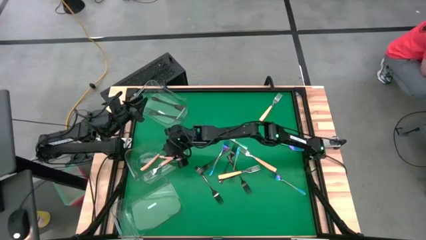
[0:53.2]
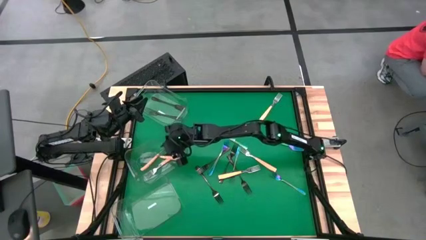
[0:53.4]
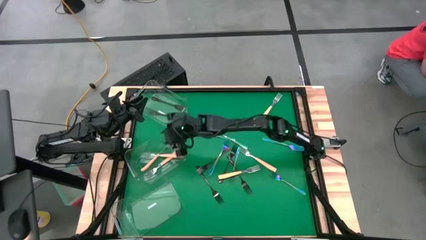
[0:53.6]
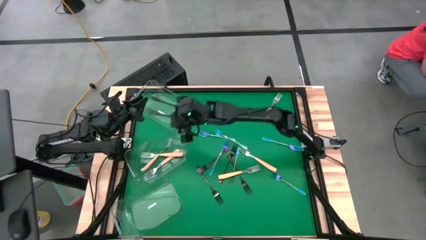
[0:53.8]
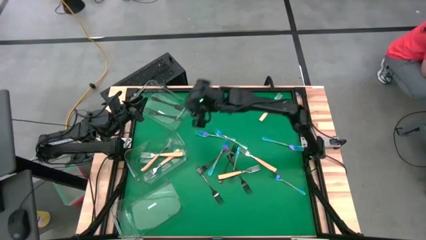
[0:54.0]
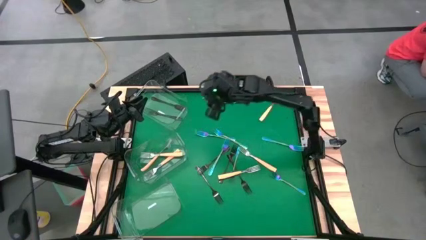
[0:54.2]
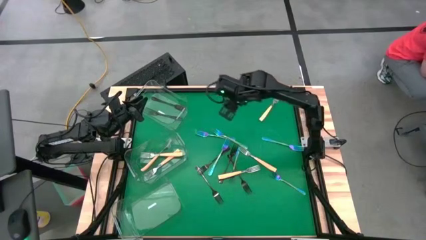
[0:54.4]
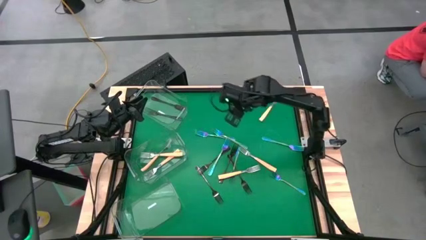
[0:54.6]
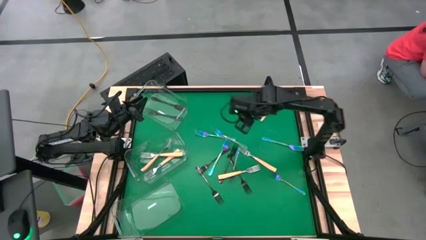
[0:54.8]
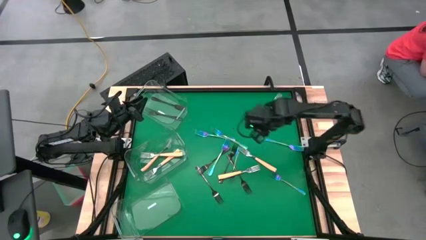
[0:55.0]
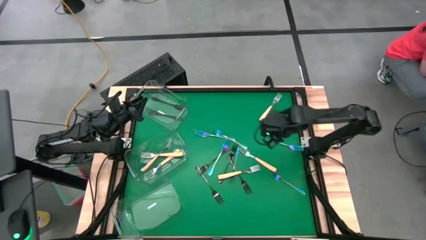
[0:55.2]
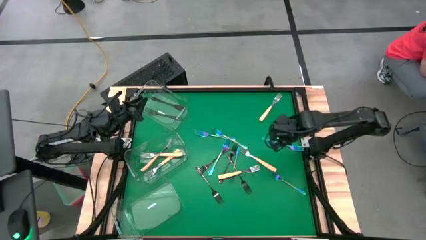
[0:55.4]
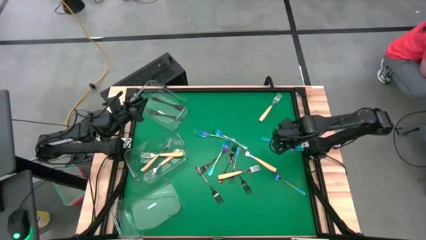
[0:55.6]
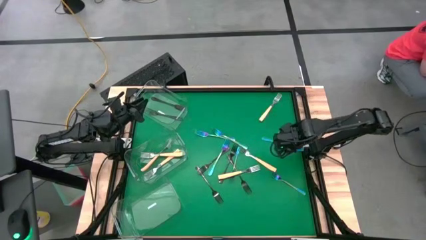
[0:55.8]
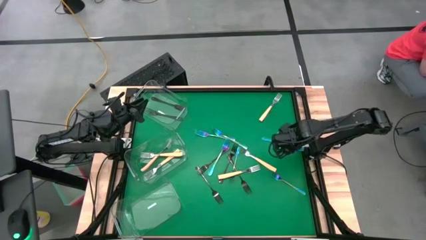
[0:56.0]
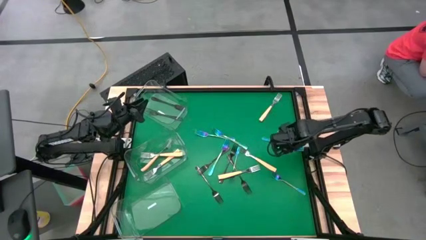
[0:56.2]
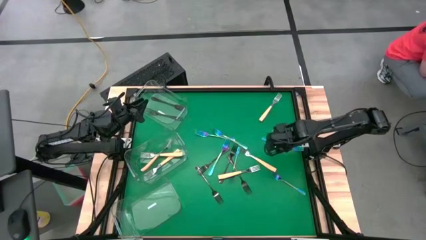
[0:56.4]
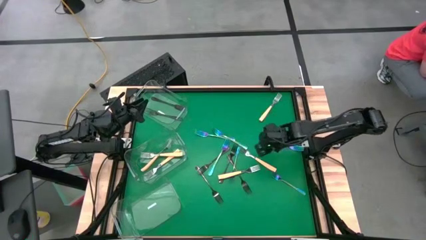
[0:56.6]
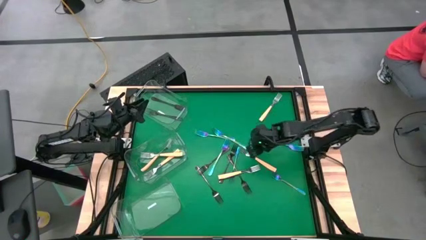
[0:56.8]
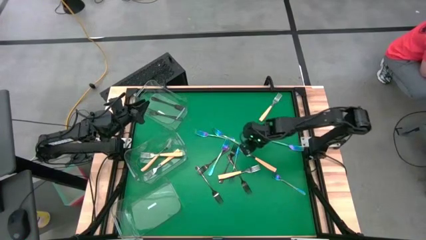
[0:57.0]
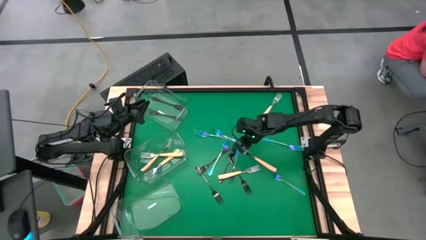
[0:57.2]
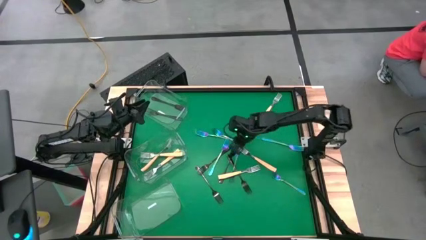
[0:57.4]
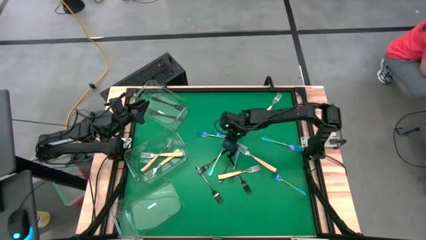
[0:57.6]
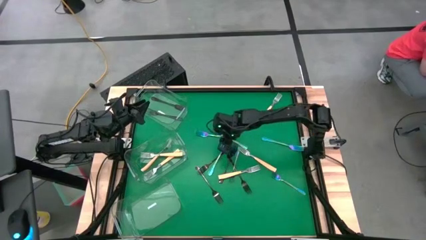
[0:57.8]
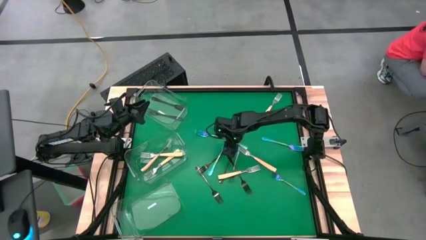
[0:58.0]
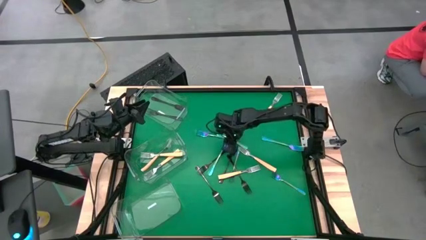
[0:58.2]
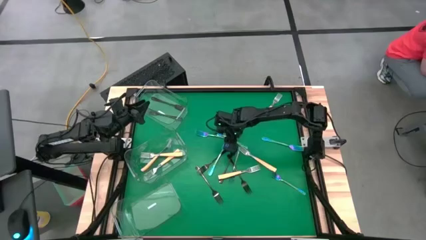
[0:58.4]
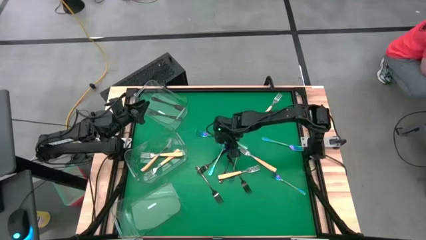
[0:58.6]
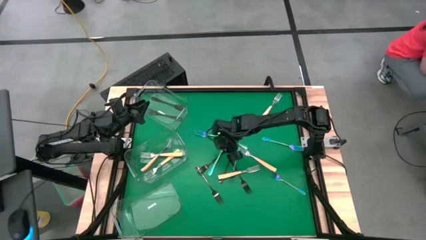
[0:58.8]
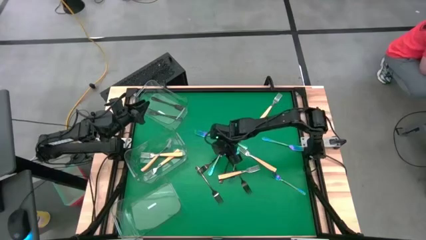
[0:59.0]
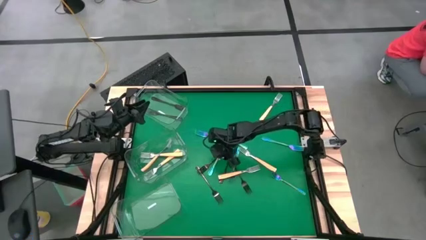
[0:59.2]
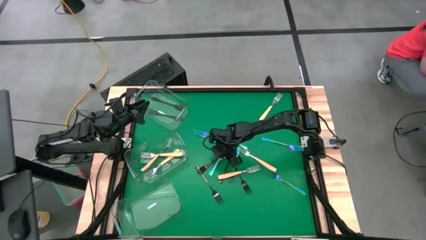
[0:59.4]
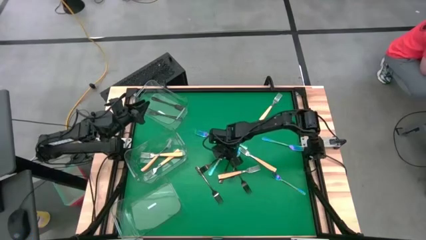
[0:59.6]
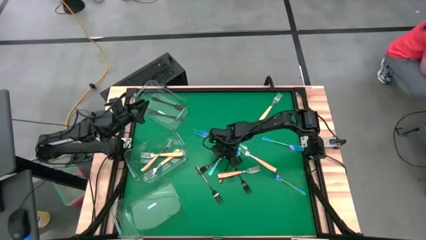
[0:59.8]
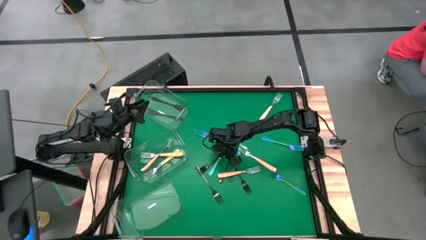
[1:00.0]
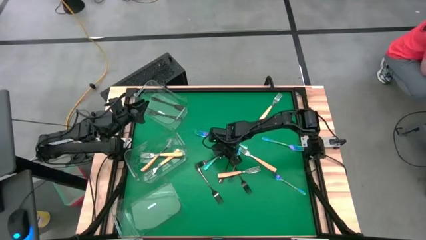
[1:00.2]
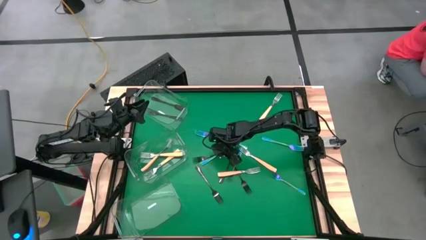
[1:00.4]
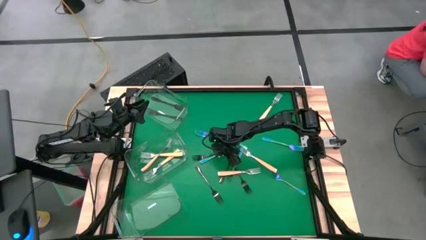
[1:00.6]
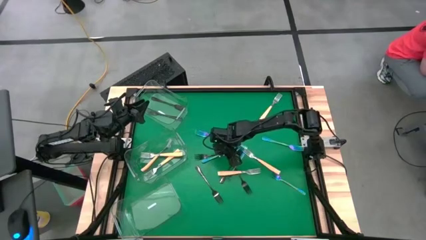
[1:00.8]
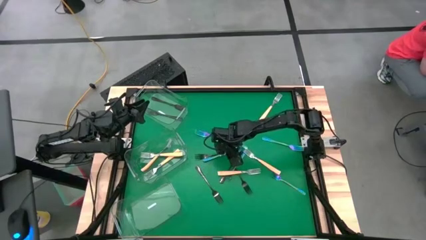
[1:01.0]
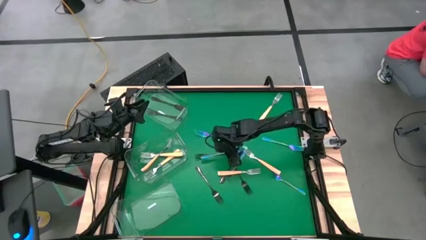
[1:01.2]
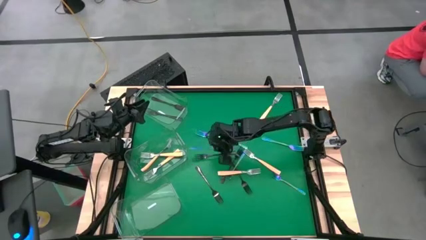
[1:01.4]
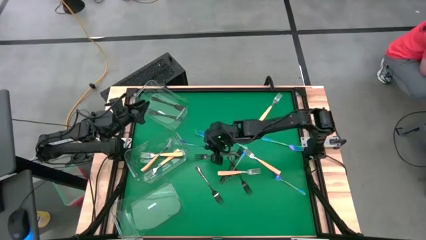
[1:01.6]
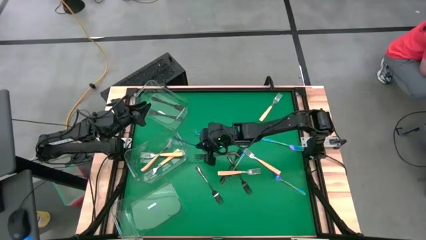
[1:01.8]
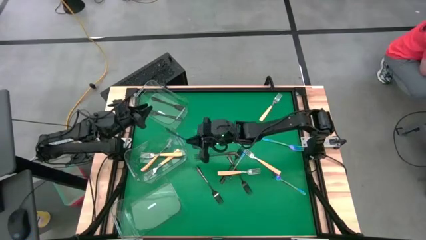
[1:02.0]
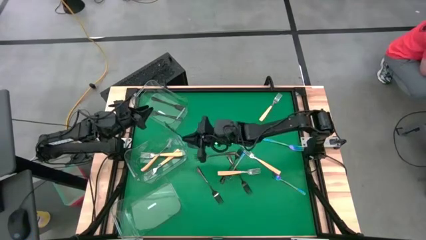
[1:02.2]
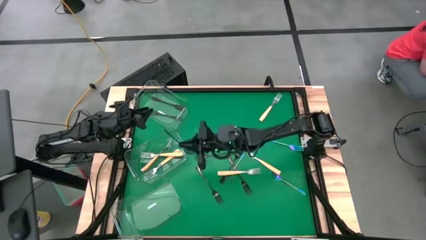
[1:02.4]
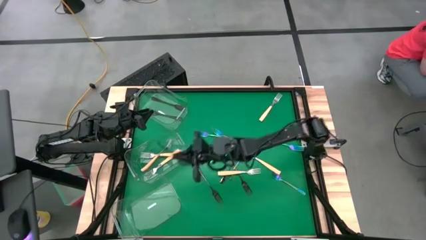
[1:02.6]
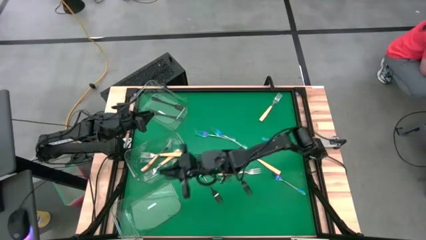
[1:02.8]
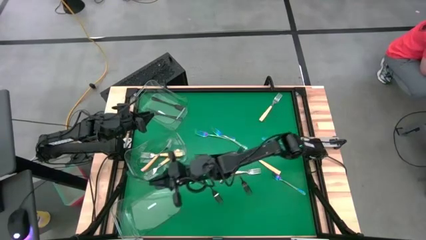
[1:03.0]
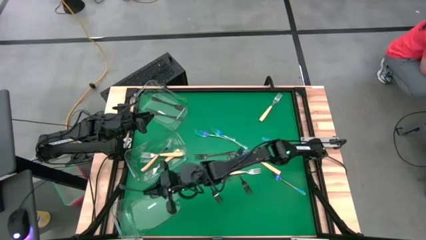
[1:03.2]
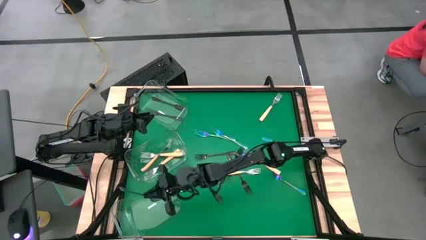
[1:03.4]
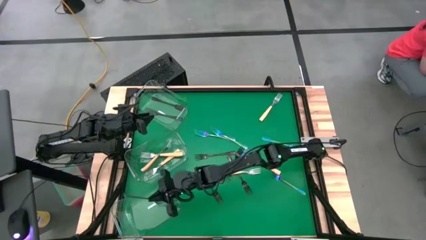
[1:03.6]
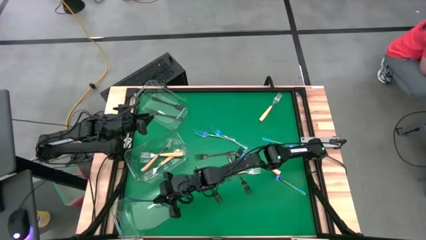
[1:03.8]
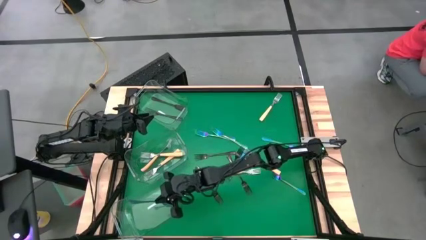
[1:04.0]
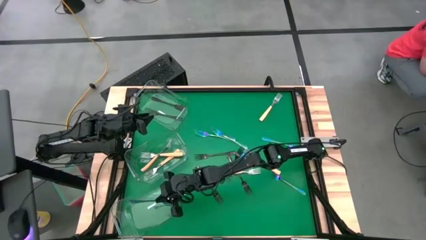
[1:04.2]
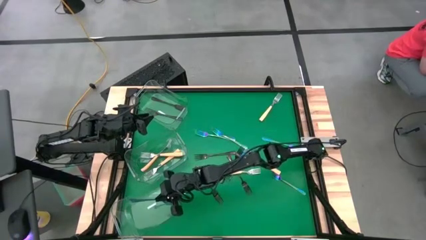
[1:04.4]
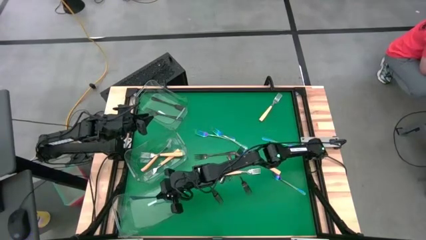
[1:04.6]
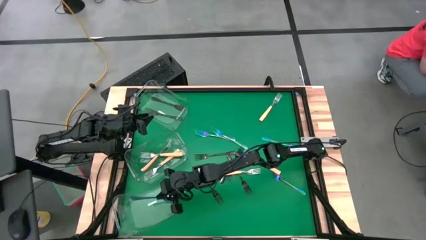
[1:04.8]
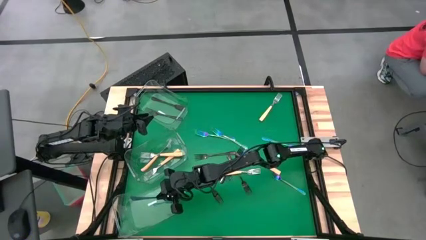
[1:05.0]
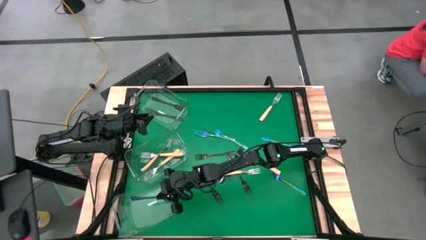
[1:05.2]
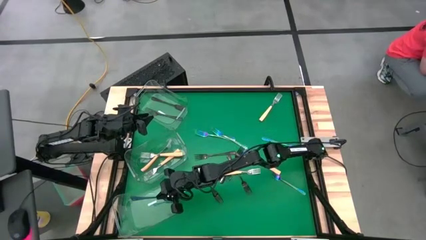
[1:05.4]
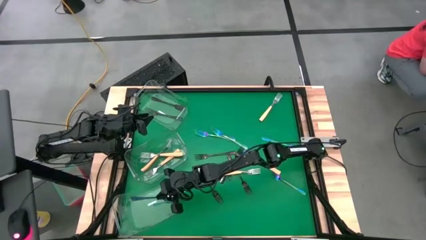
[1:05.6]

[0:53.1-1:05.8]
Task: Sort silverware by color (type)
Put the blue fork into the bottom transparent bin

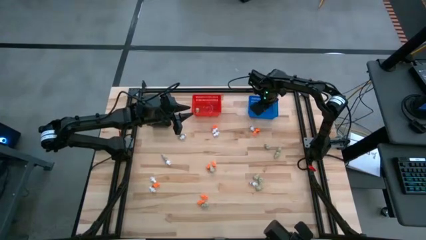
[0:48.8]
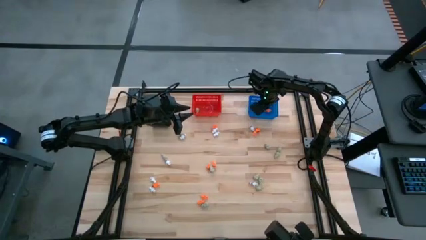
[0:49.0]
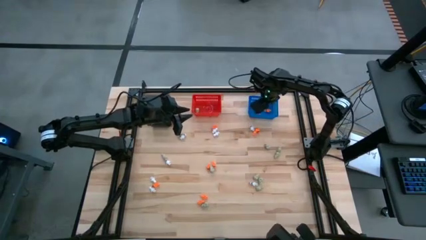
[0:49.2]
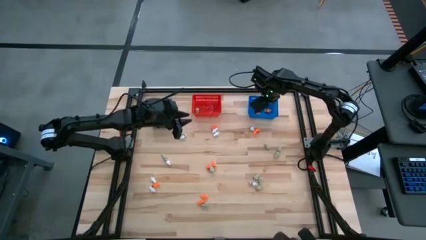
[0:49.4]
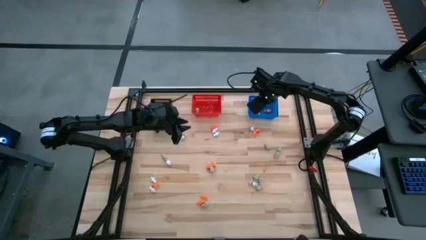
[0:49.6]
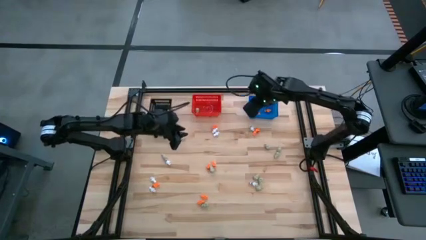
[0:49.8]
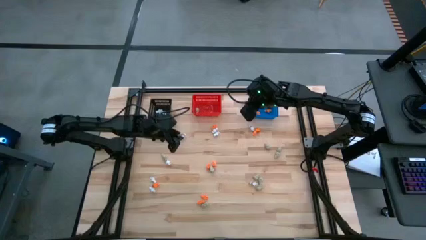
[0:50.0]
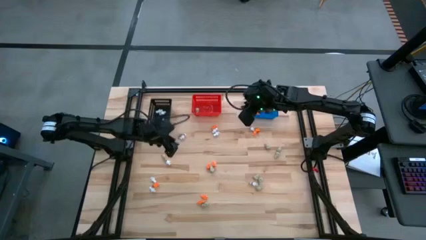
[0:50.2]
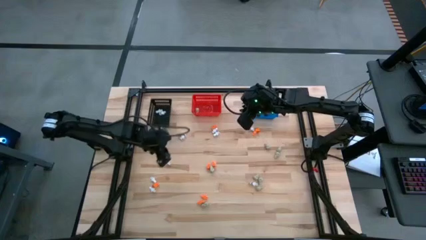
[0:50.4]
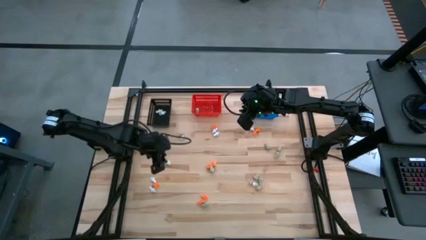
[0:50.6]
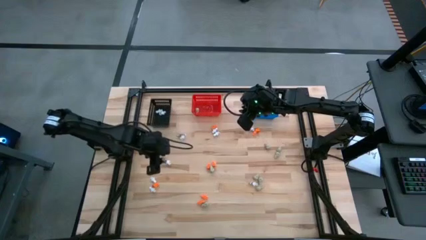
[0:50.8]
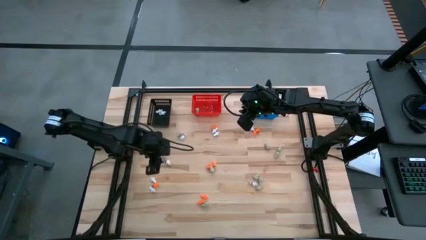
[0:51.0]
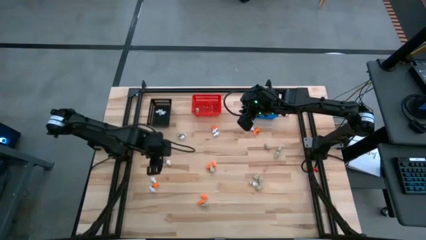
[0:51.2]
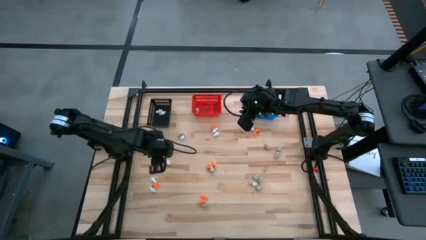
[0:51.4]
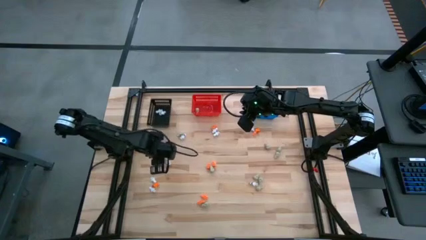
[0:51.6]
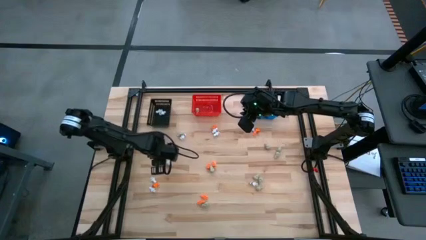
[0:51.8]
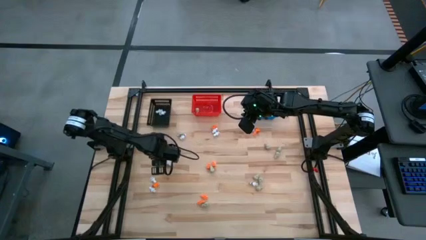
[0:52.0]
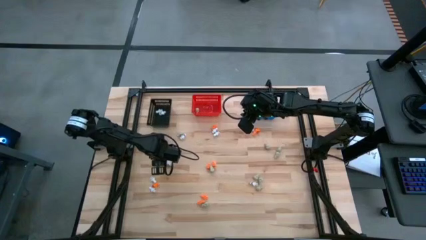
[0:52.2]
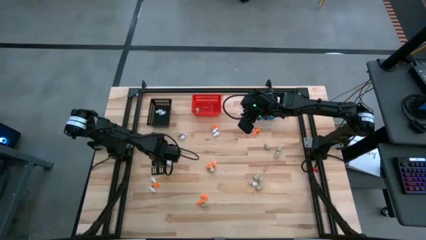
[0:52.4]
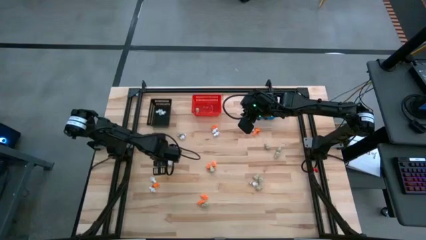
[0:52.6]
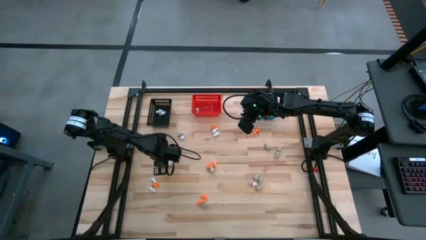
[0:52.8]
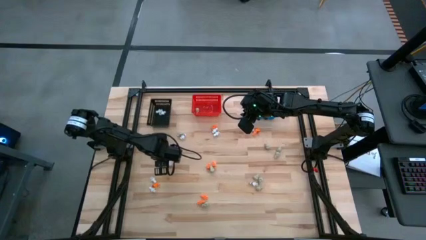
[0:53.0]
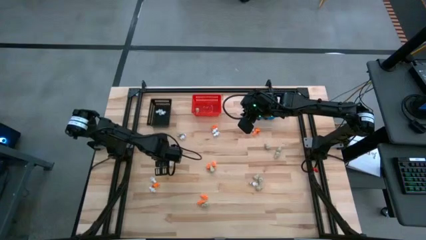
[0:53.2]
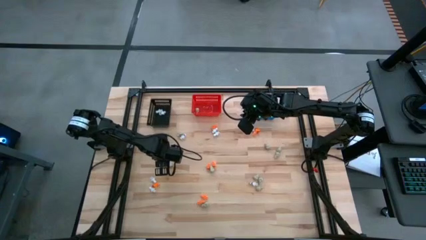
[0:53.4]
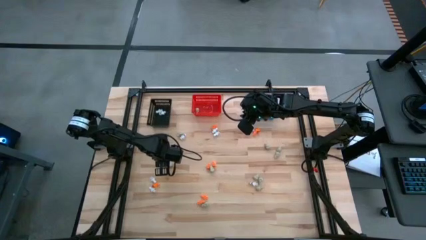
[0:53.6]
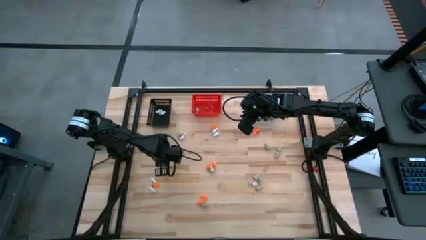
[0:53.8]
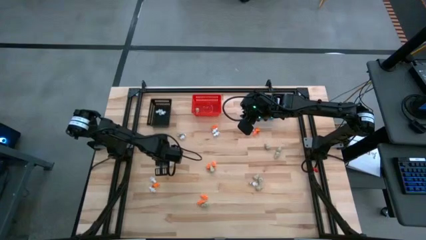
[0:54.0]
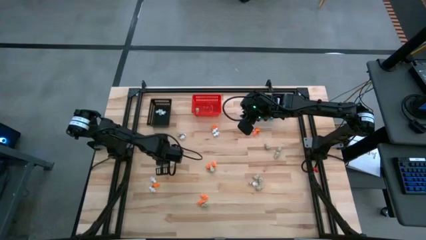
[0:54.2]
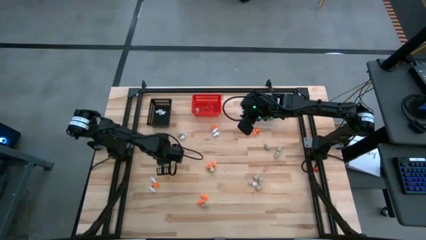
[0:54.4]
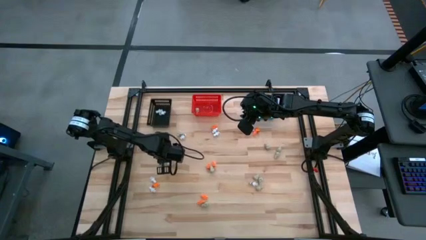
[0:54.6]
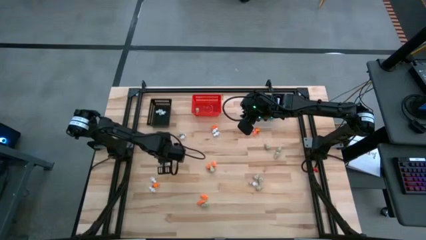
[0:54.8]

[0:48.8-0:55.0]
Task: Sort Halloween decoration
Put the white skull toy into the red bin
